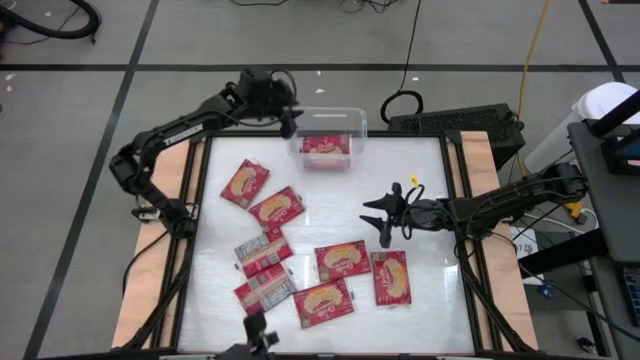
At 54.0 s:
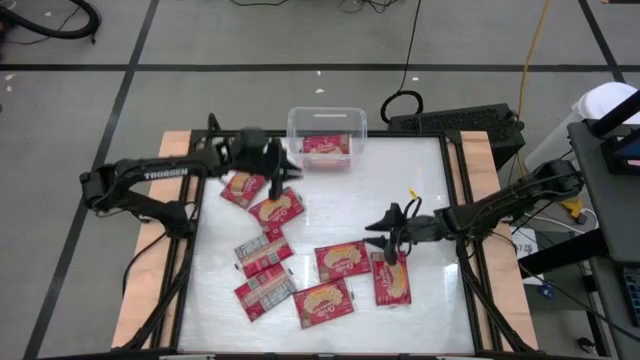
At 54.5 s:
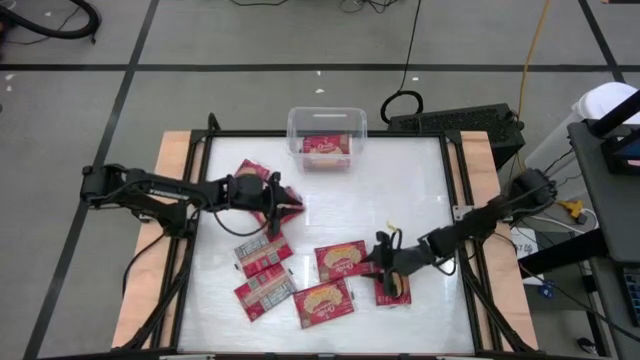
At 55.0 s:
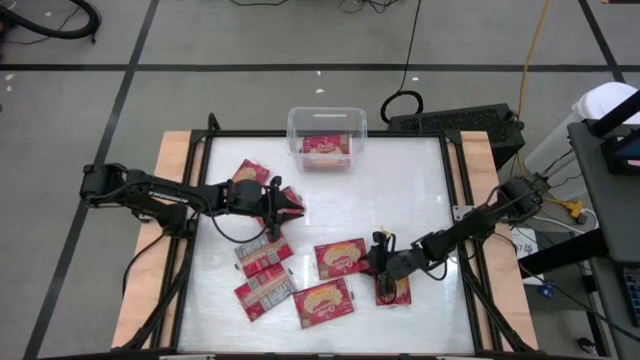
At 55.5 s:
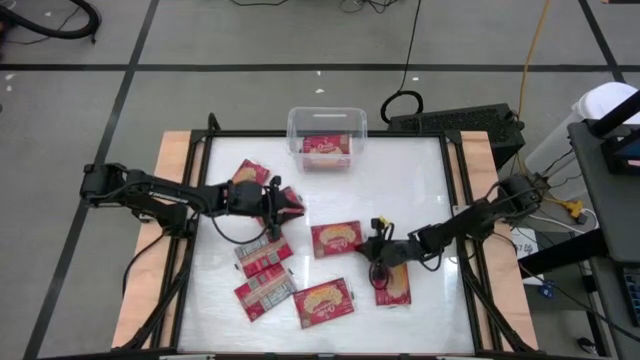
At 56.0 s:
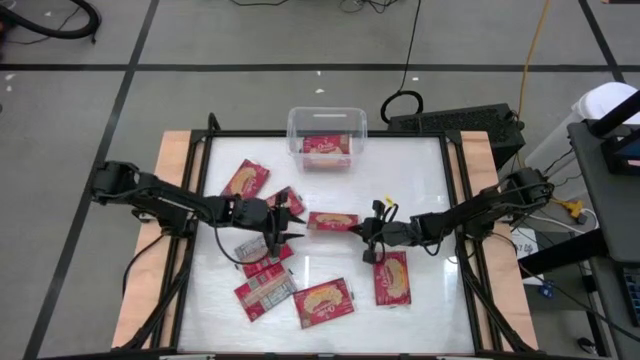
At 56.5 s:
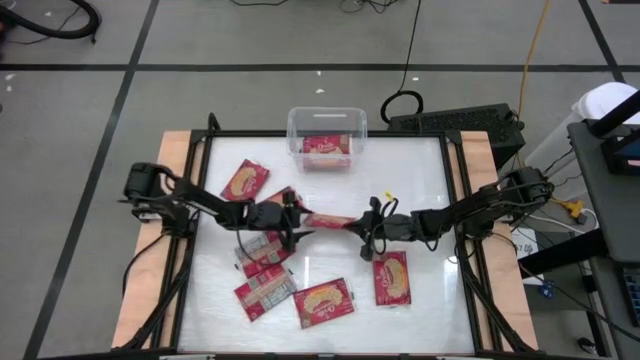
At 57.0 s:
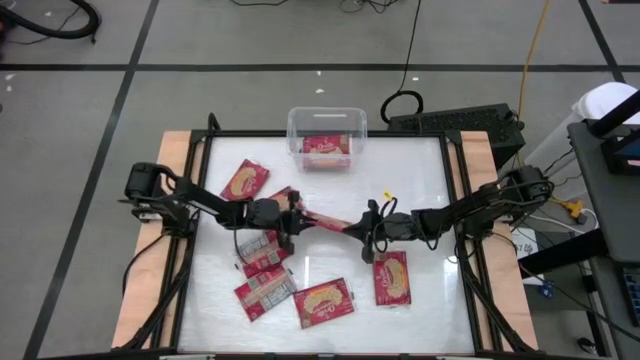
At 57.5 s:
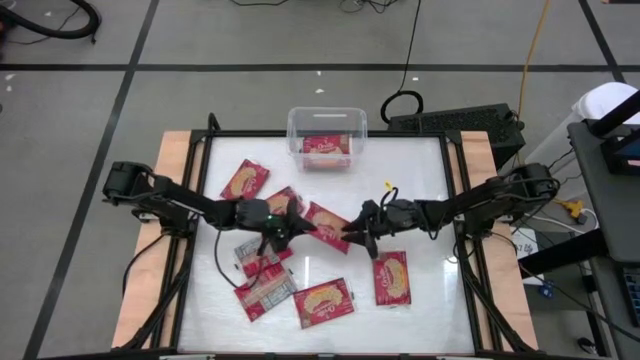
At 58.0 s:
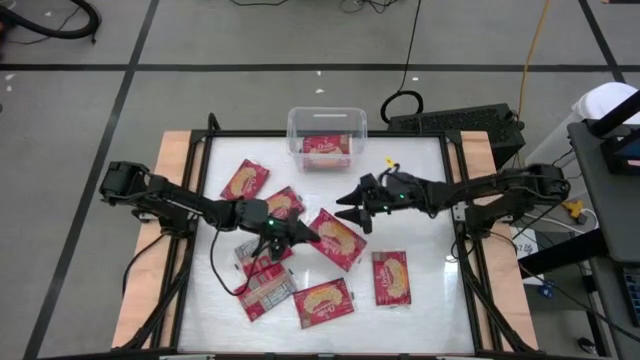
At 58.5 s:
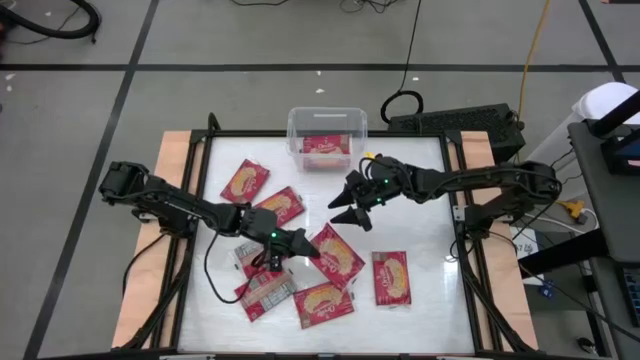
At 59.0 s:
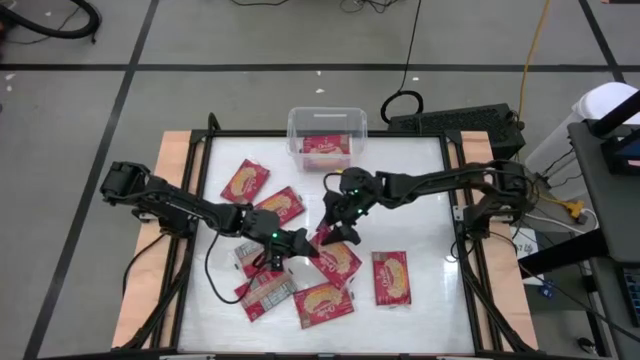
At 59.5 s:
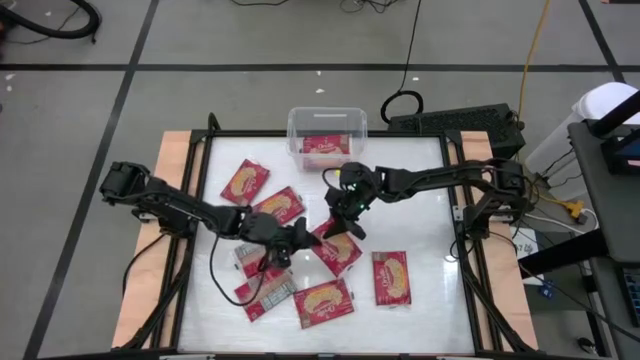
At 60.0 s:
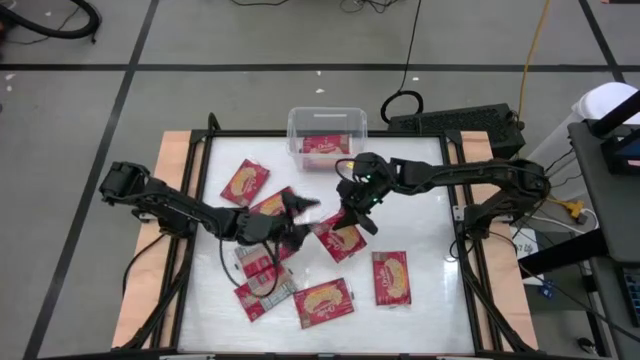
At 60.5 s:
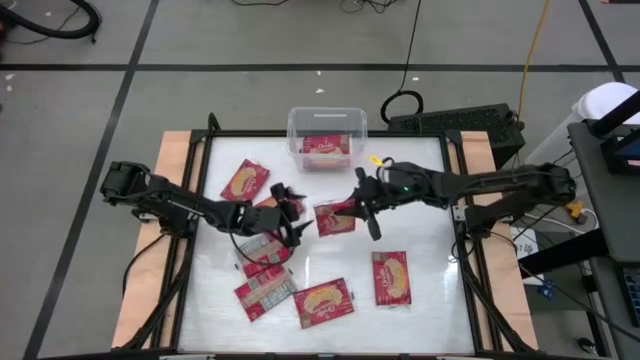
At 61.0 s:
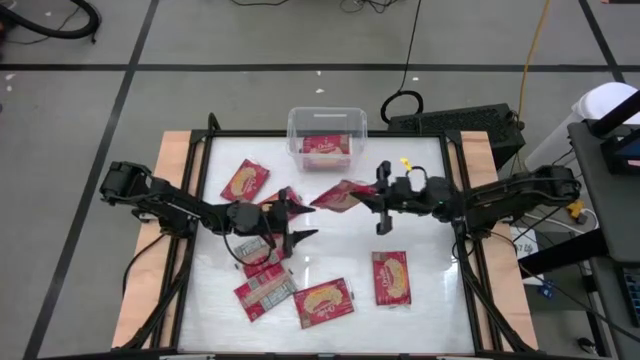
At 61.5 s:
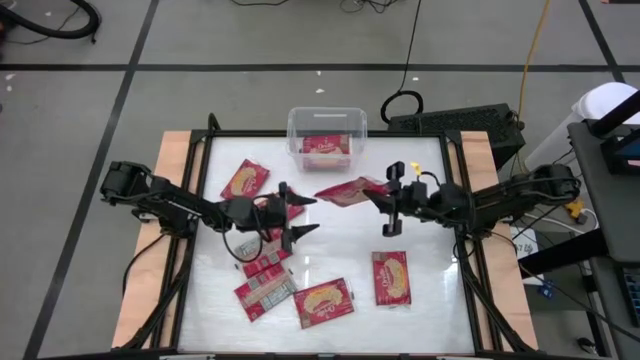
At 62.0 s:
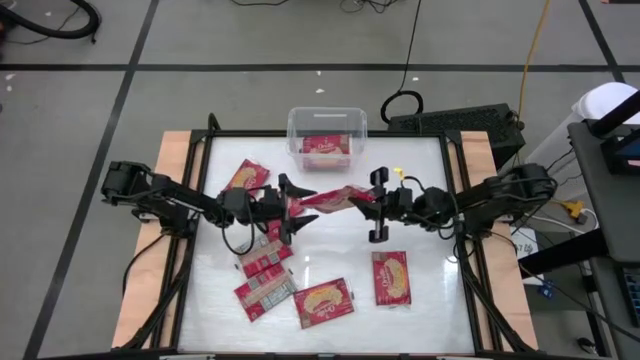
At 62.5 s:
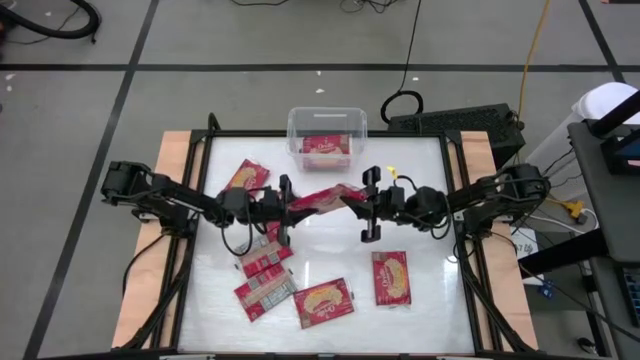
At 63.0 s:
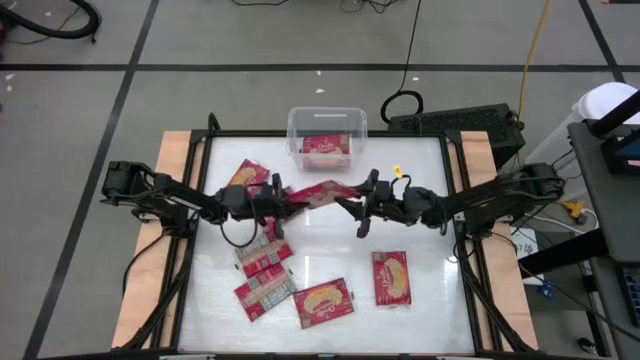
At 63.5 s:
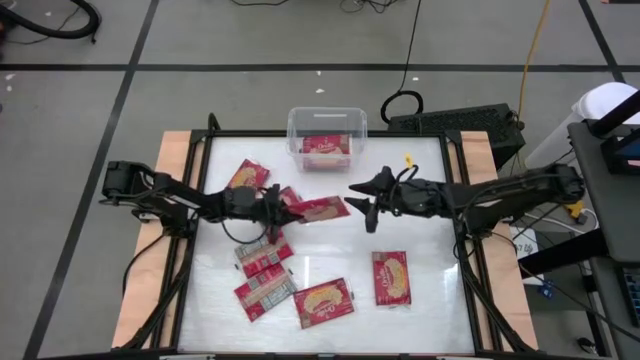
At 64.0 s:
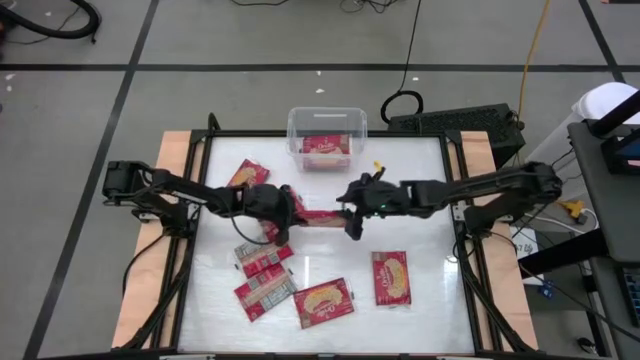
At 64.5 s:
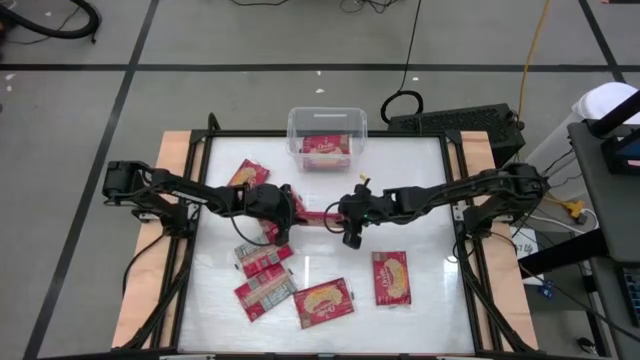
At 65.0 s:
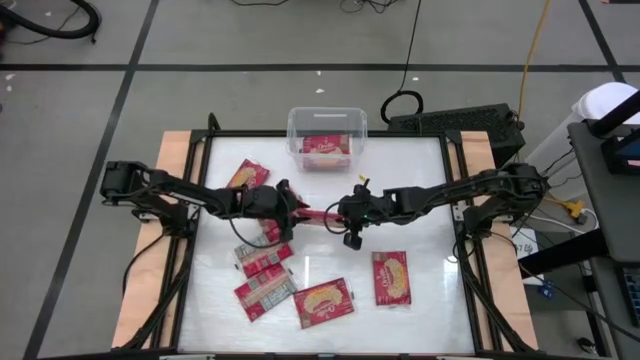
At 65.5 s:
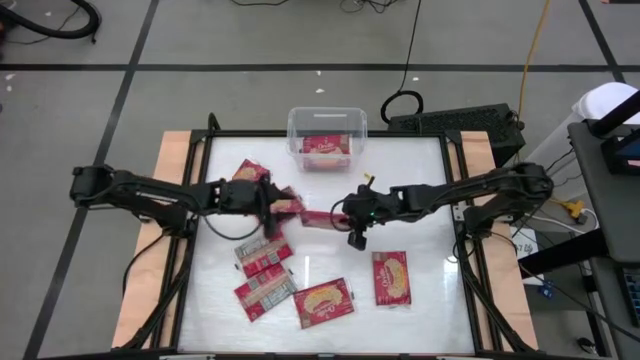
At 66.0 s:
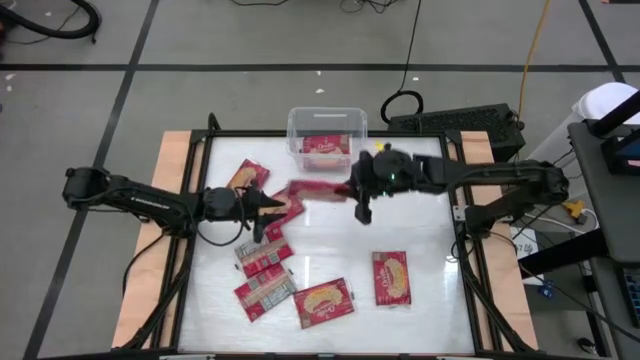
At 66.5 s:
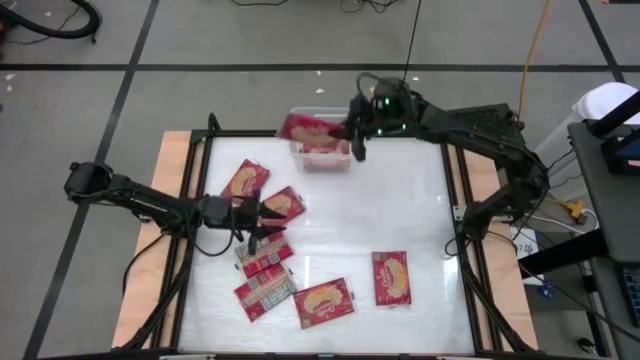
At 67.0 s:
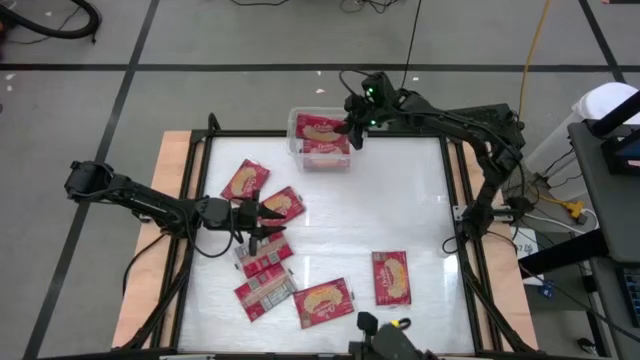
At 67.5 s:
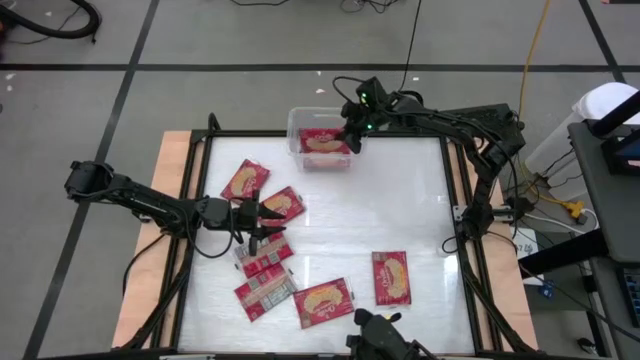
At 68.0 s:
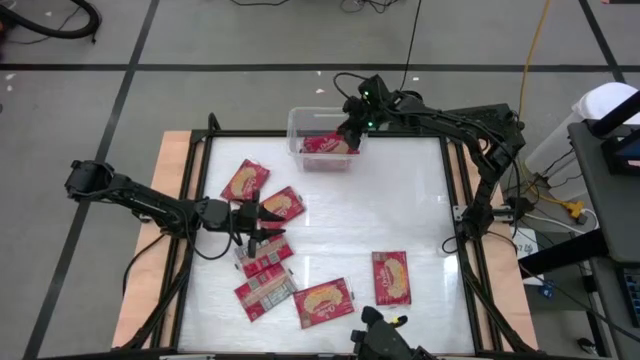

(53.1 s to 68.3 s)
Task: Sort popcorn bags into baskets
Put the popcorn bag into the transparent bin

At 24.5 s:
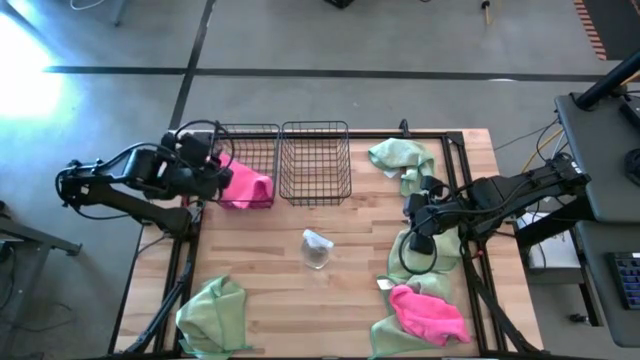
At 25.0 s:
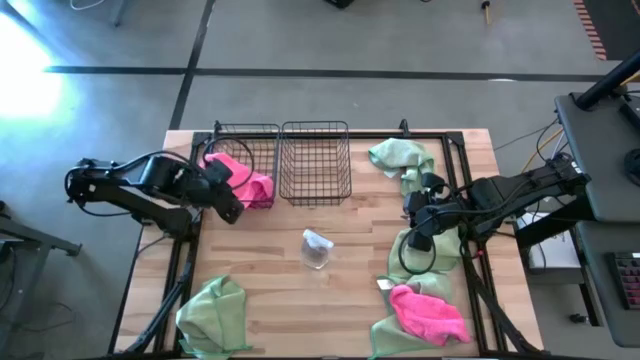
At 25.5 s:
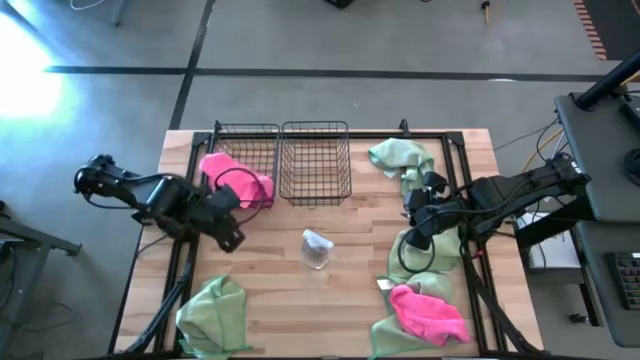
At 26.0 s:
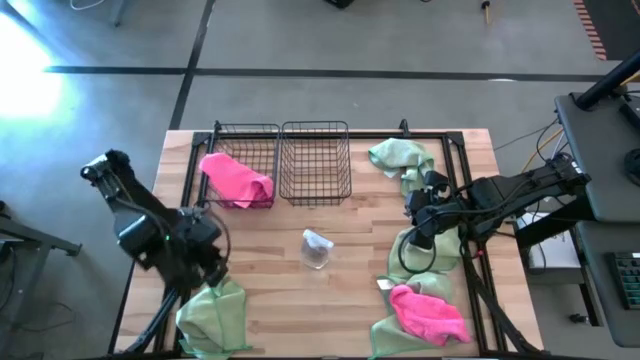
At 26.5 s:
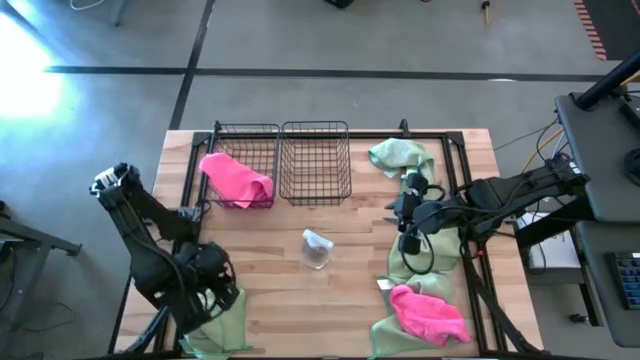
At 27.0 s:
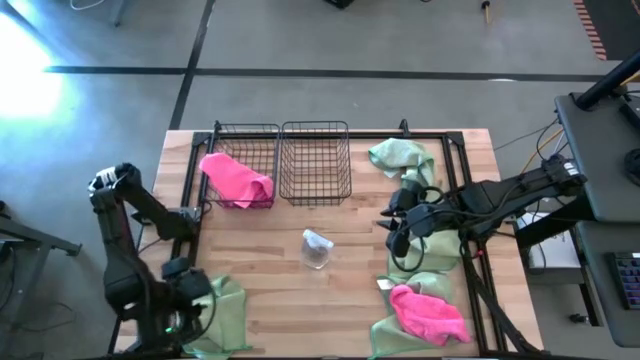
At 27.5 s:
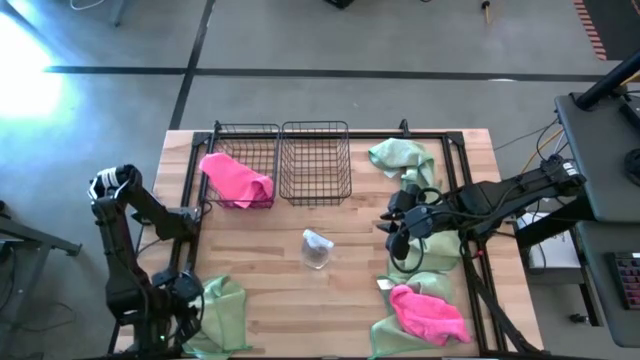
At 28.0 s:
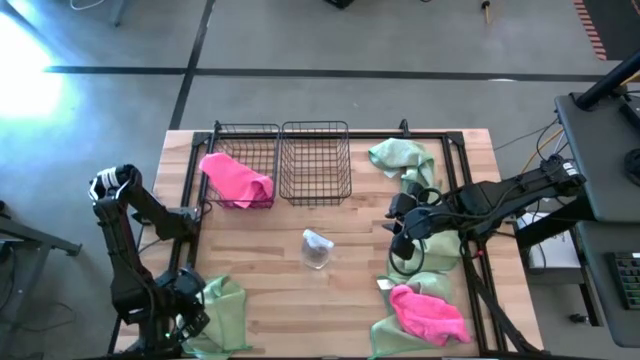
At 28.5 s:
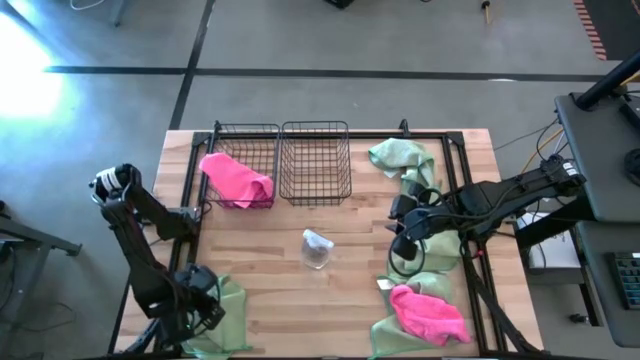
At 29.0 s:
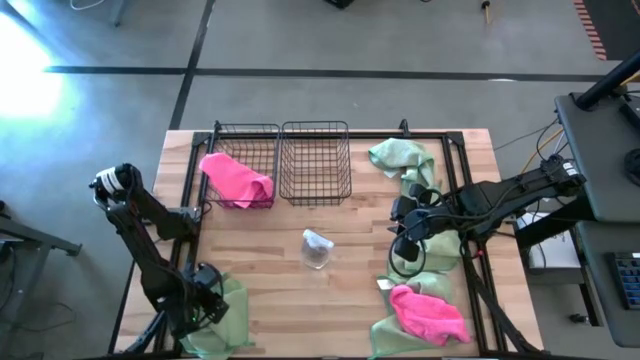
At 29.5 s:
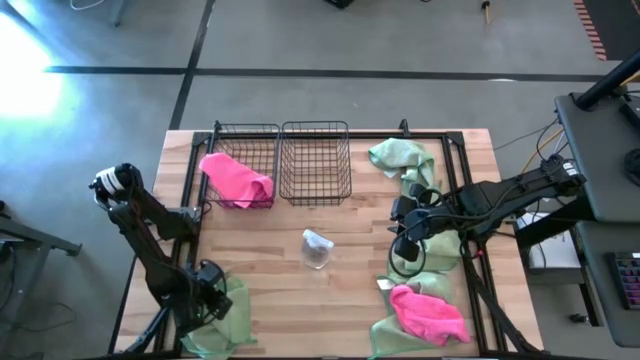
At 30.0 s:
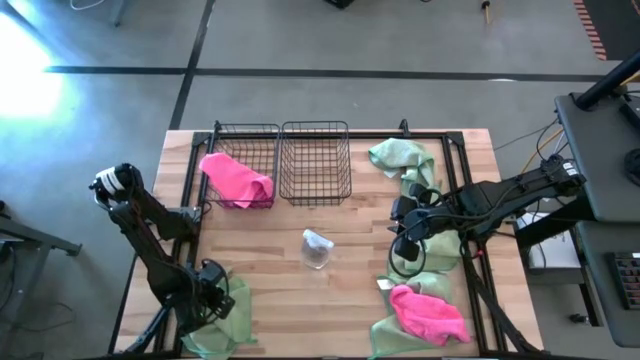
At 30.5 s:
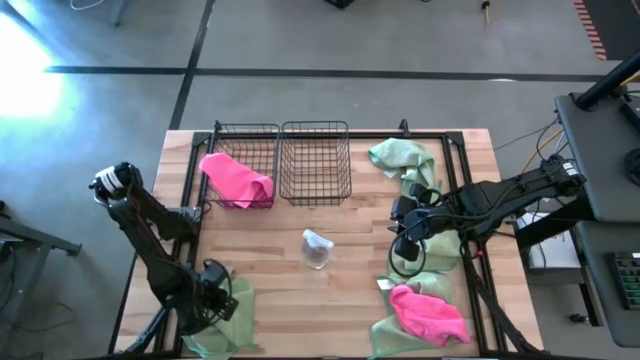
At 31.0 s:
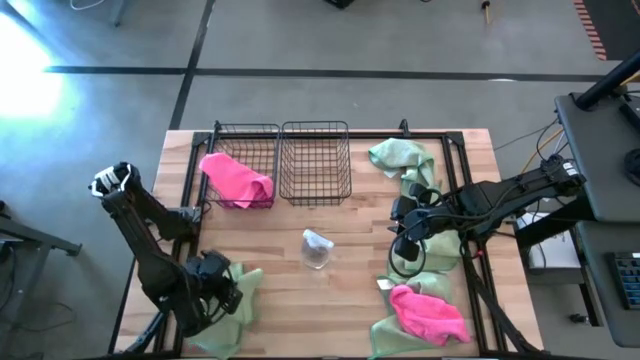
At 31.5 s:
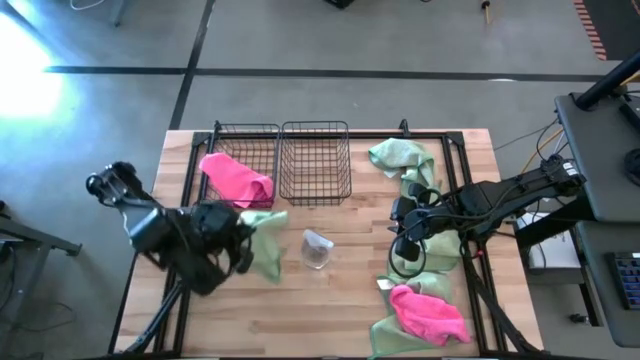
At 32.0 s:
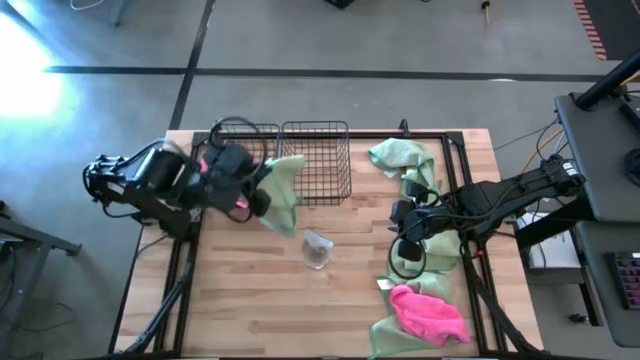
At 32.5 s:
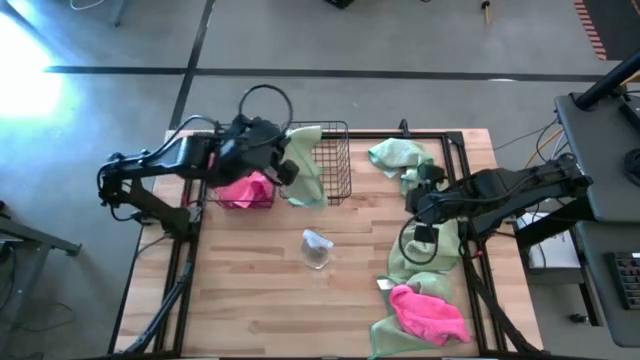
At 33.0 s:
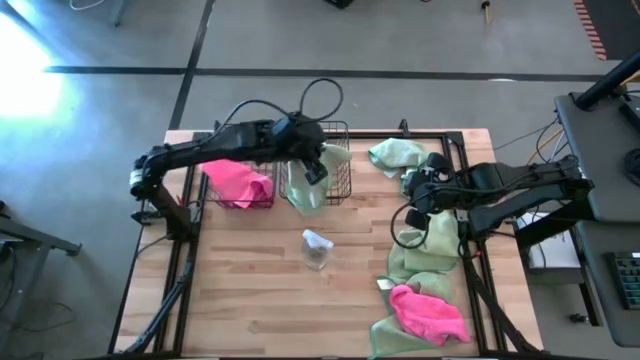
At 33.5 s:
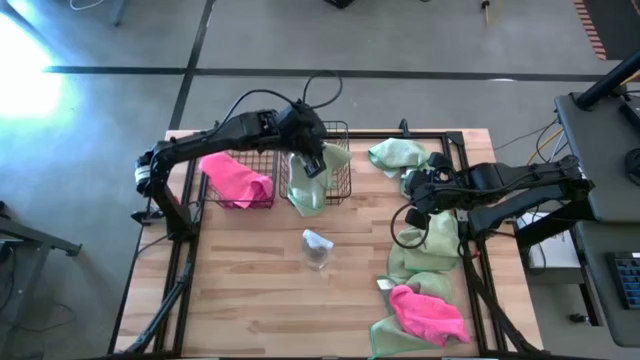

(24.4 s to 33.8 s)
Task: Sort microfiber towel by color & place in baskets
Put the bottom left green microfiber towel into the right black wire basket
